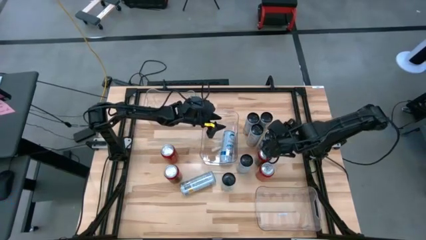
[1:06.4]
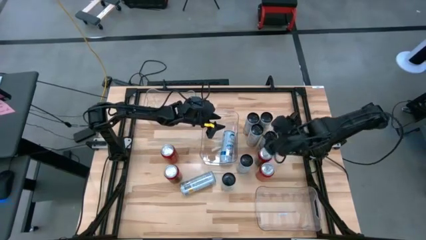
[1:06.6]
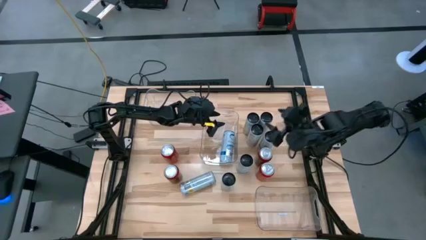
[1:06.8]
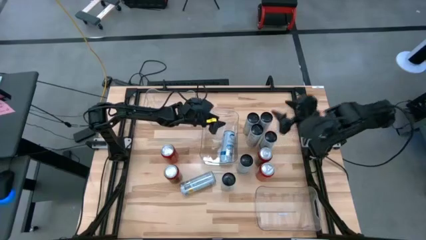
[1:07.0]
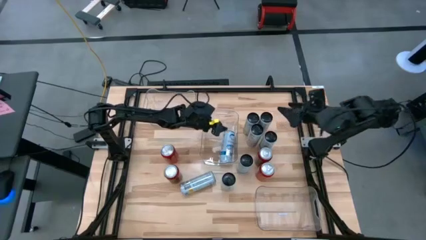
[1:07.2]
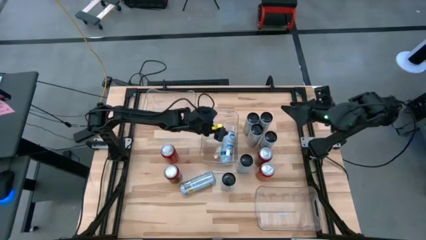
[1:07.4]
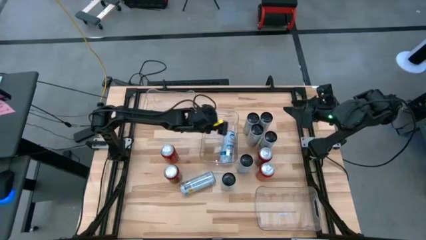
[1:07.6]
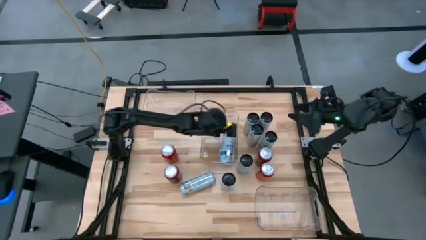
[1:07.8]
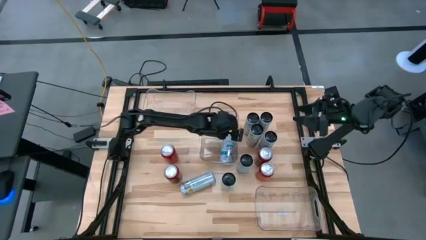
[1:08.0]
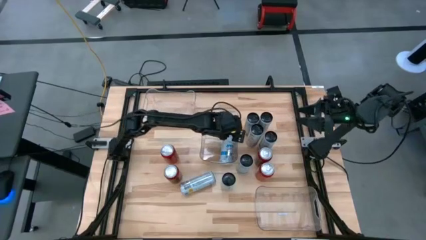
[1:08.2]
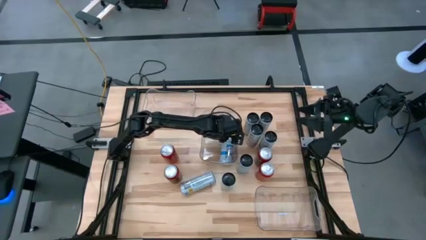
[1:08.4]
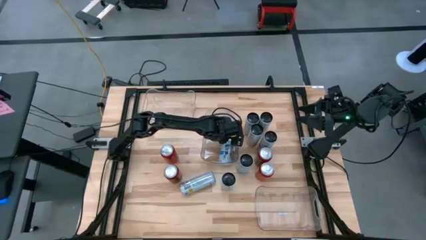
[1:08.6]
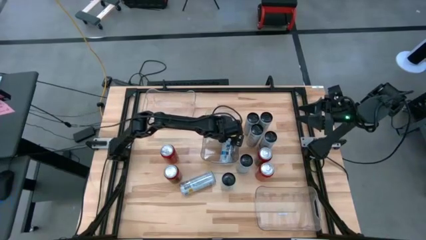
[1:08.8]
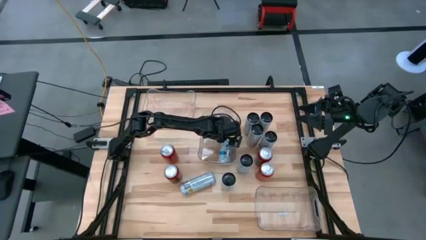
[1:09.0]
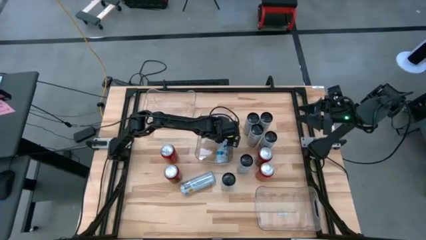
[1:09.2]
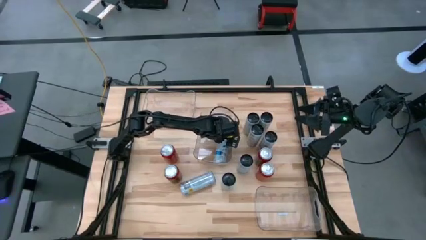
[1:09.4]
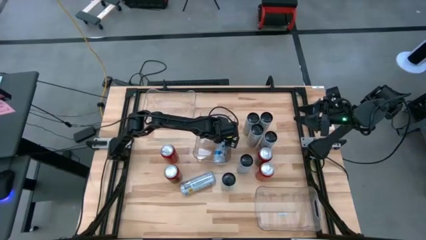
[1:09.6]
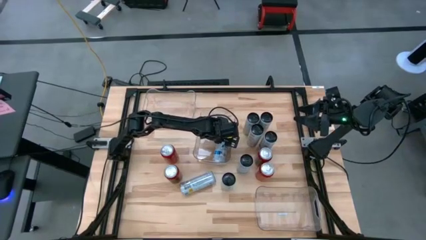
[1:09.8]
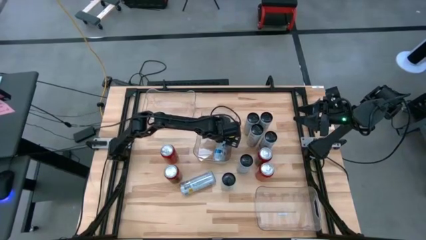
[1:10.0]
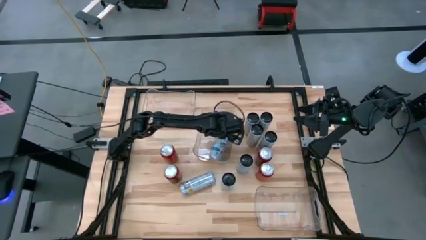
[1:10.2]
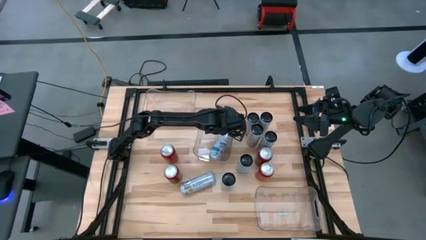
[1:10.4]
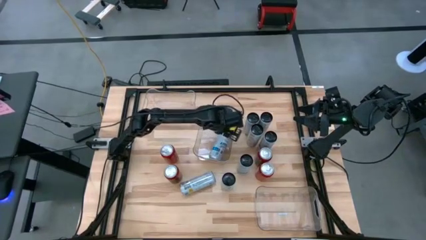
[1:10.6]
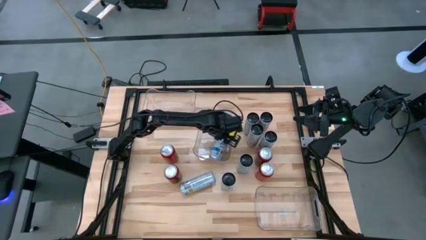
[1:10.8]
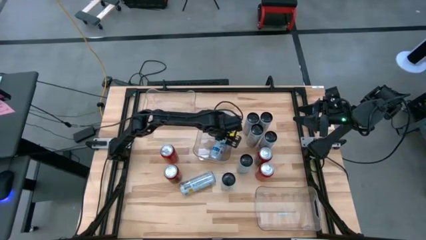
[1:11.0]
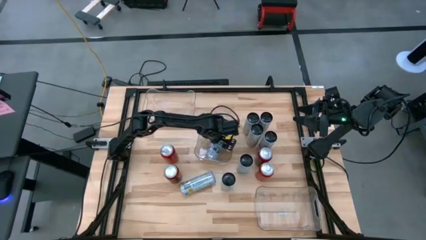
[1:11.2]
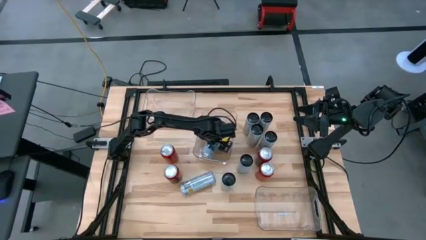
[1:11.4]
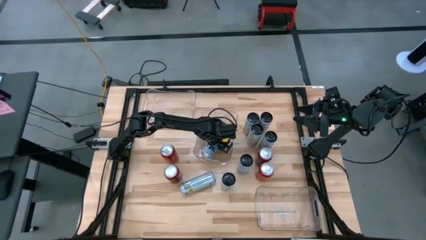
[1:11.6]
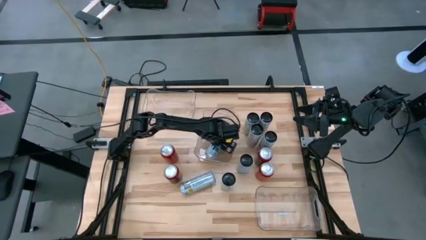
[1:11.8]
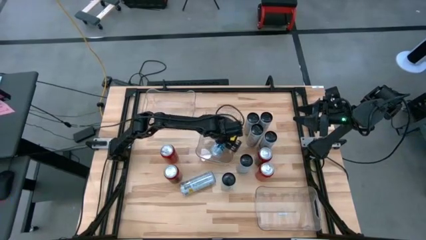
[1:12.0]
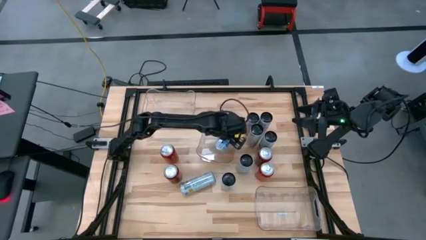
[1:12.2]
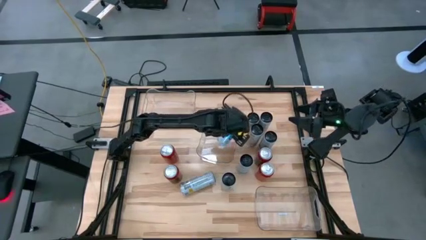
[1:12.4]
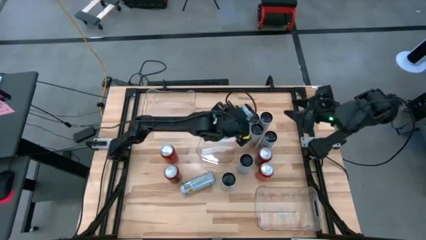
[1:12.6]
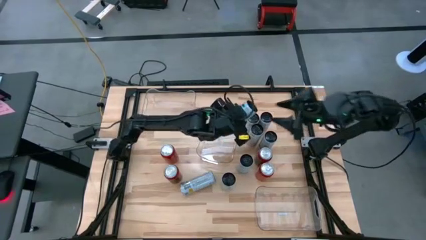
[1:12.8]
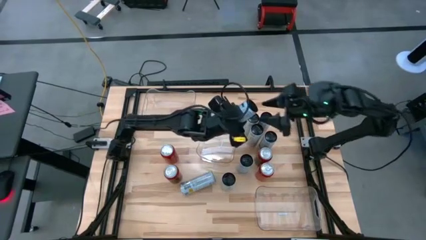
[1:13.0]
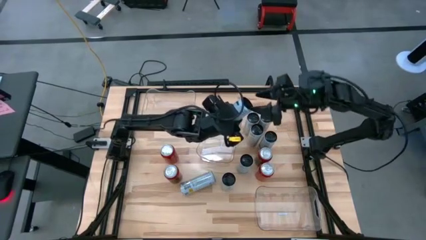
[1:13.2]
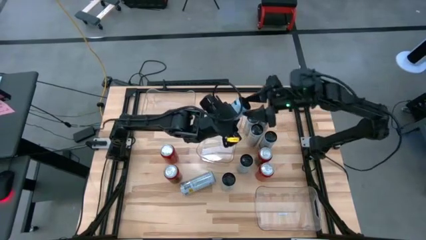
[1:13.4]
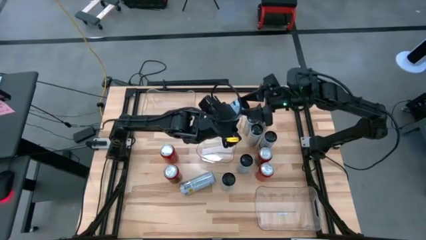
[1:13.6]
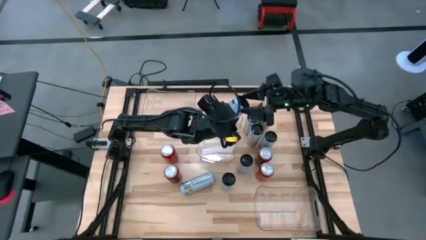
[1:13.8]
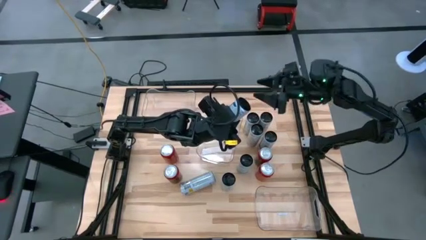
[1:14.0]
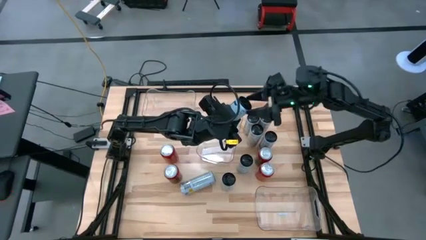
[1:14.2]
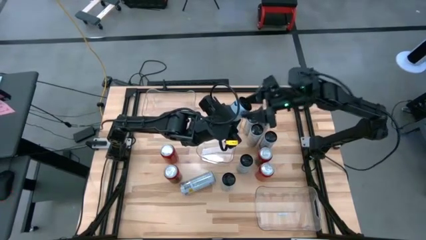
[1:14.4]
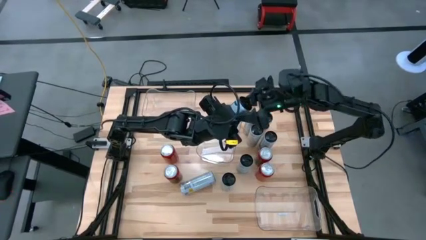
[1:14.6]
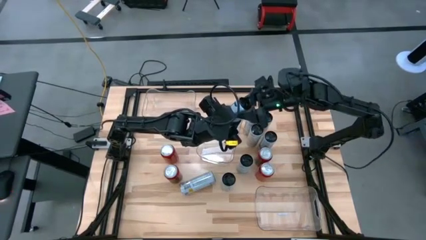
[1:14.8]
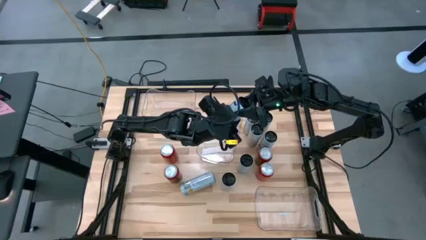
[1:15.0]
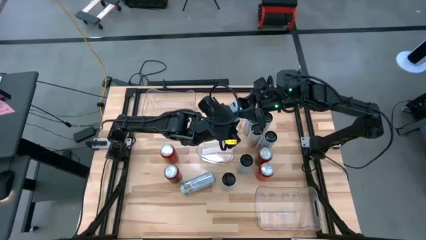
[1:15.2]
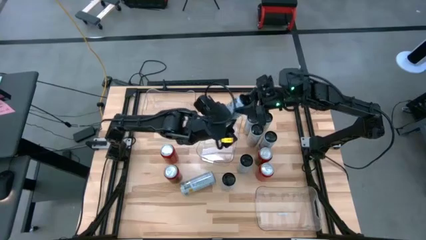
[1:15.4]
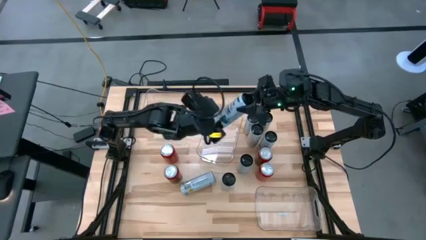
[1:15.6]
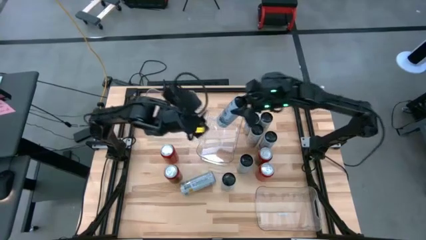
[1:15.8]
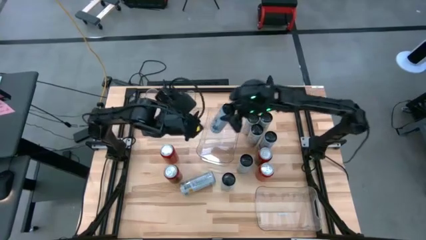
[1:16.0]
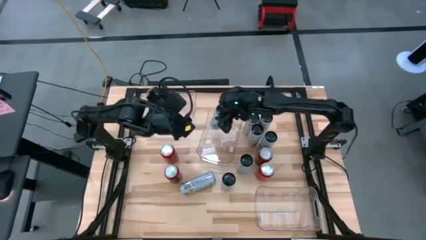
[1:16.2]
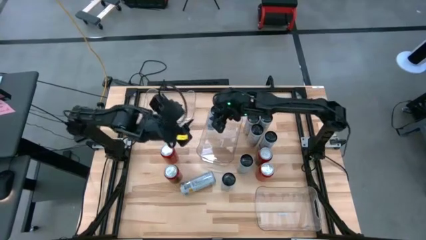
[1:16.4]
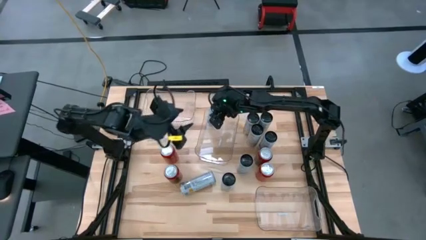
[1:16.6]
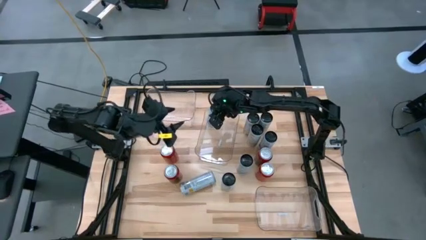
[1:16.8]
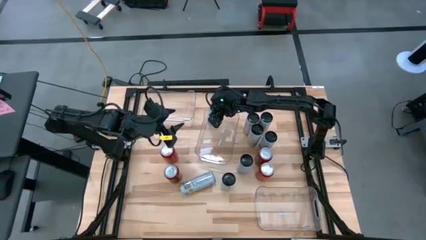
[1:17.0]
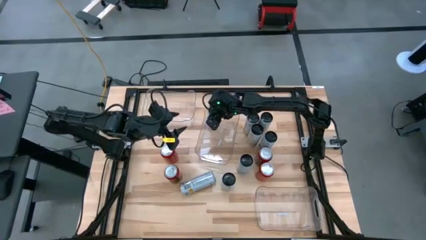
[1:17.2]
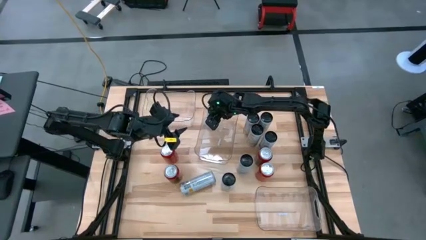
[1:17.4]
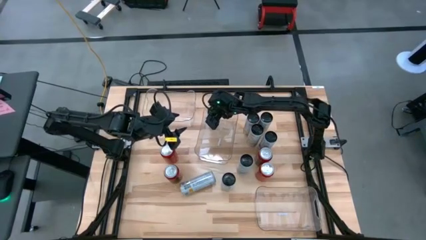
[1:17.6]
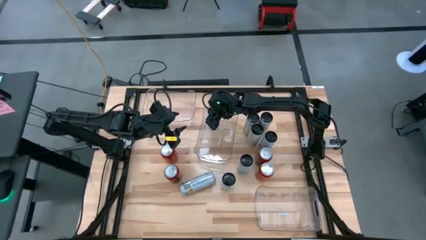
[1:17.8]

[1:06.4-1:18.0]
Task: Sort soda cans
Adjust the white blue soda can

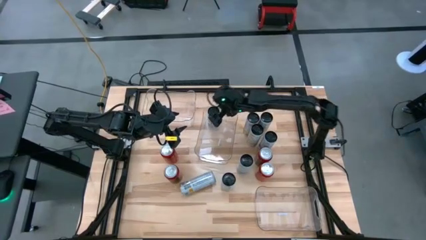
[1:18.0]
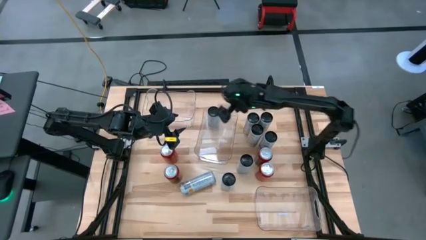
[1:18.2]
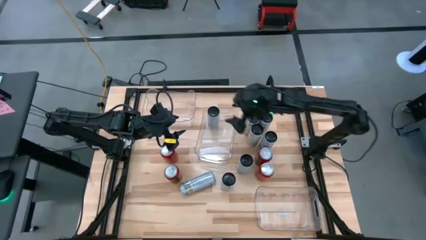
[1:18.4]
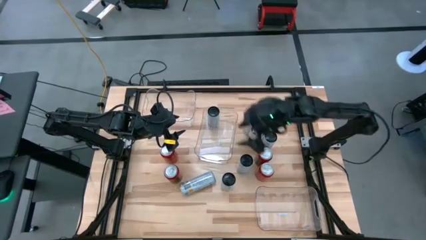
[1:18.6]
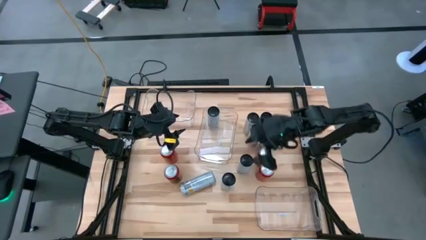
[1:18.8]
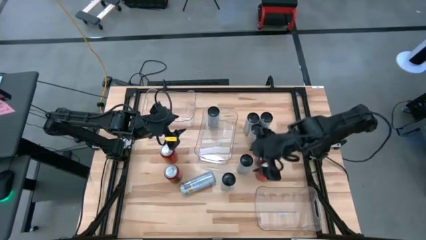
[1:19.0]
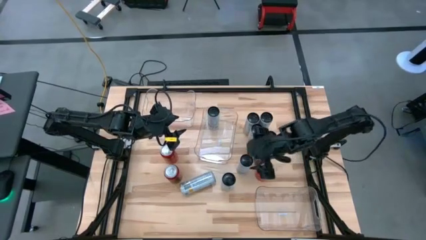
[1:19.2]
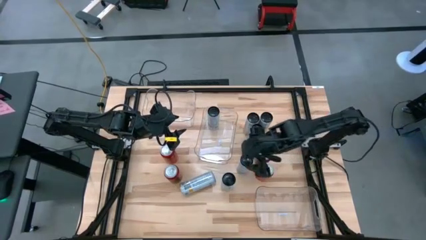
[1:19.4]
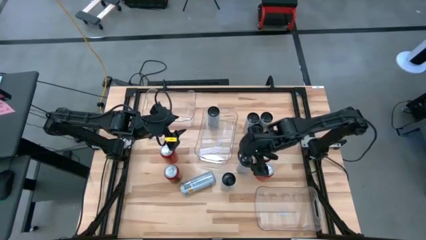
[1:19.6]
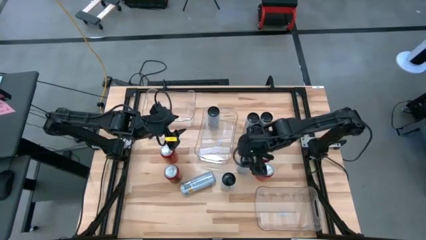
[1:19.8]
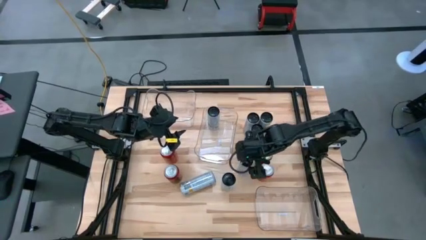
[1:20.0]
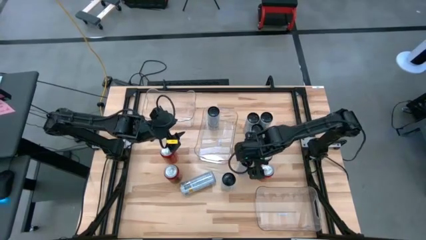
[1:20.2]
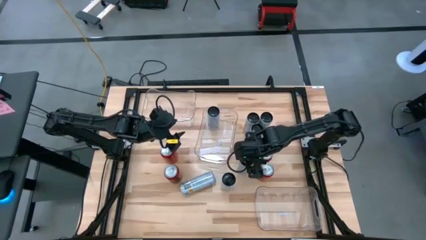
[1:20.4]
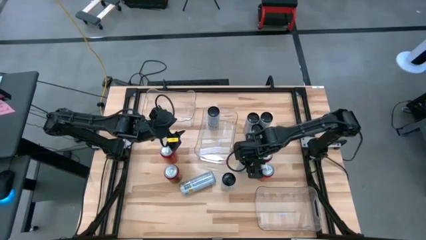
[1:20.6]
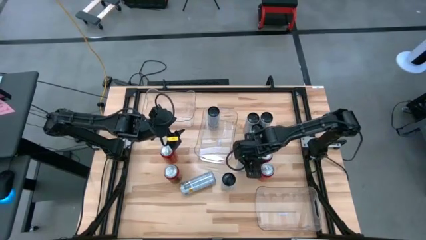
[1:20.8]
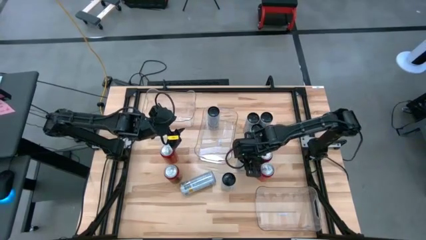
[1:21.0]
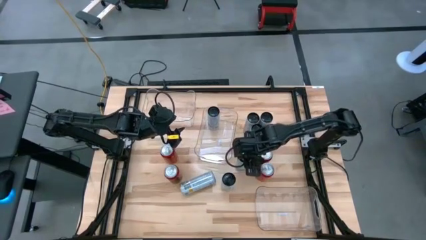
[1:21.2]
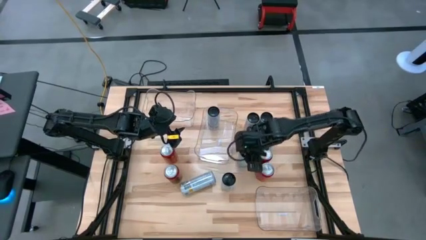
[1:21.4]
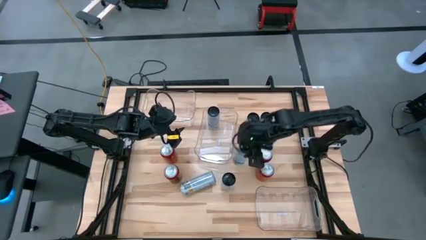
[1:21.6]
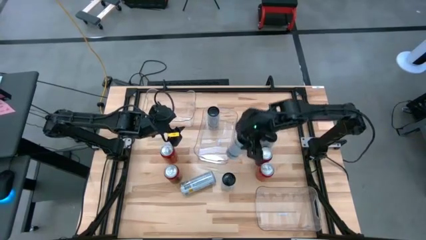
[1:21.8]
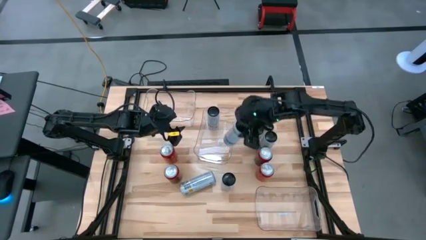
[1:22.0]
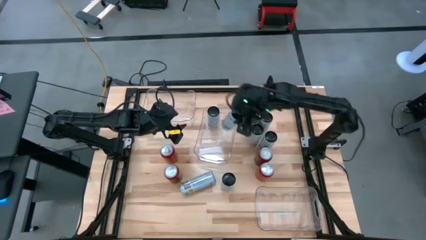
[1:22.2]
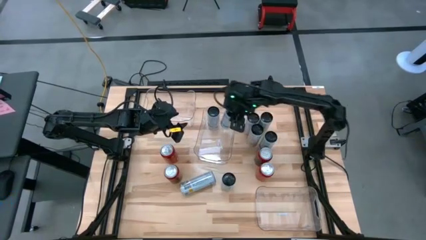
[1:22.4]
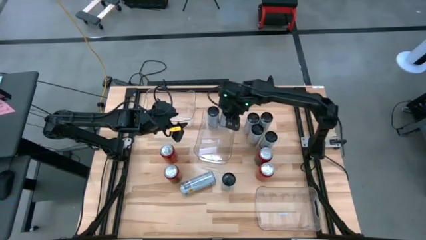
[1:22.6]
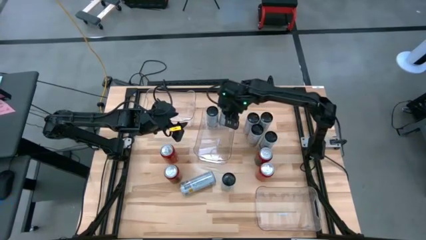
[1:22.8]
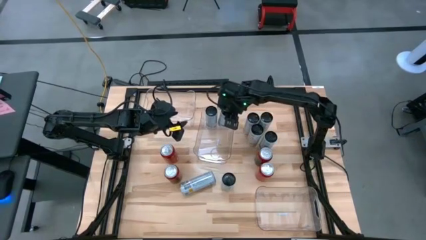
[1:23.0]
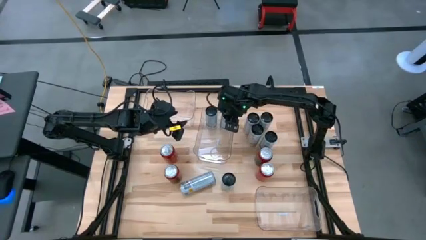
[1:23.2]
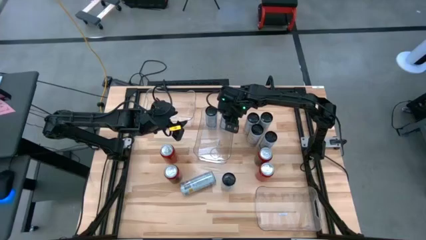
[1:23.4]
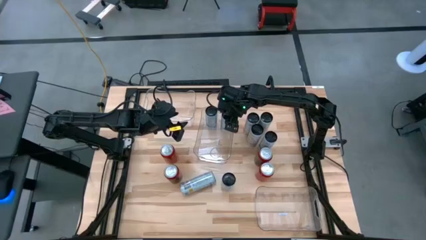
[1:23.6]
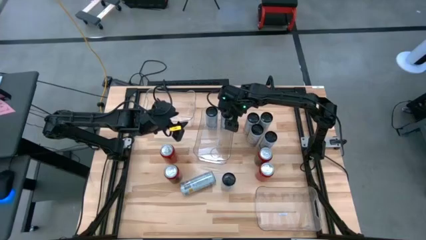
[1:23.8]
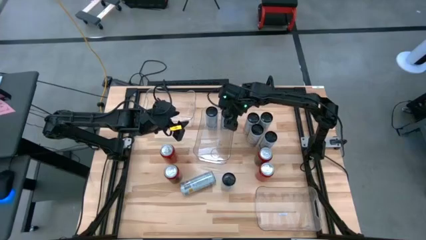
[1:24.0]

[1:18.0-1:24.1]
Put the white blue soda can into the middle transparent bin
